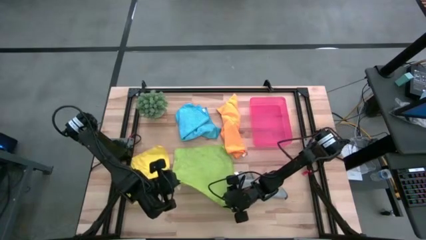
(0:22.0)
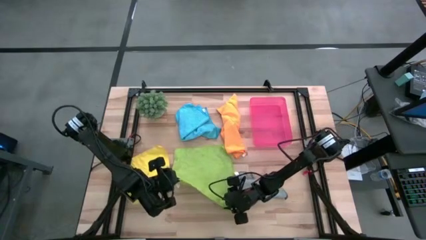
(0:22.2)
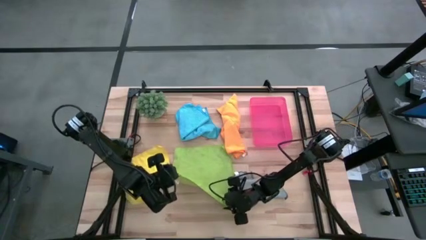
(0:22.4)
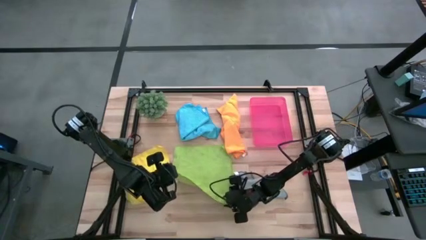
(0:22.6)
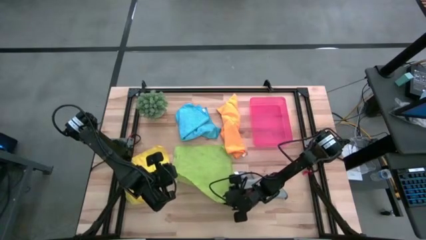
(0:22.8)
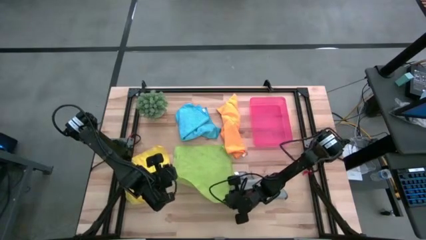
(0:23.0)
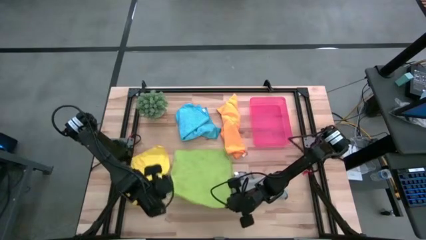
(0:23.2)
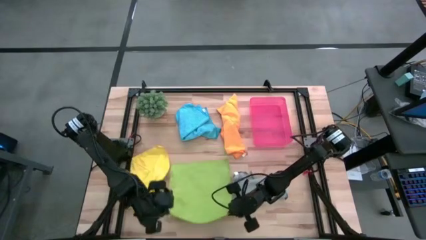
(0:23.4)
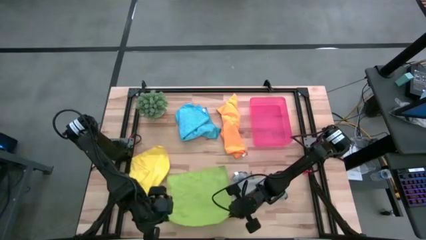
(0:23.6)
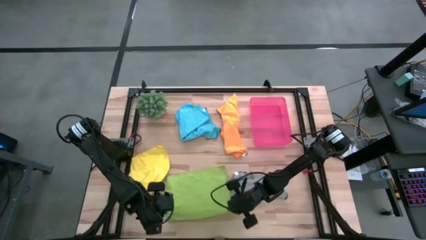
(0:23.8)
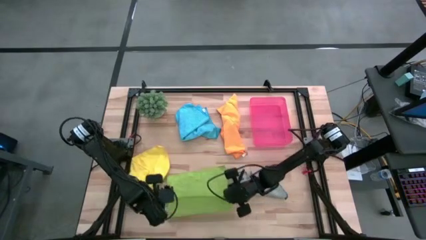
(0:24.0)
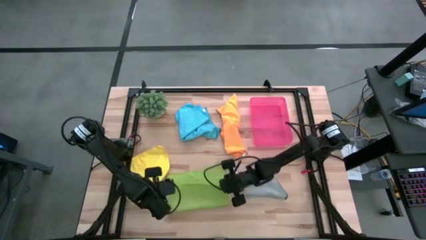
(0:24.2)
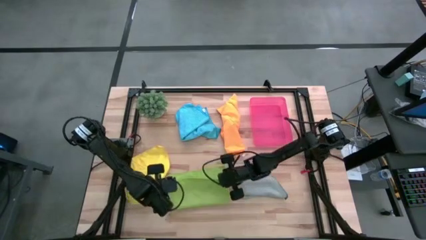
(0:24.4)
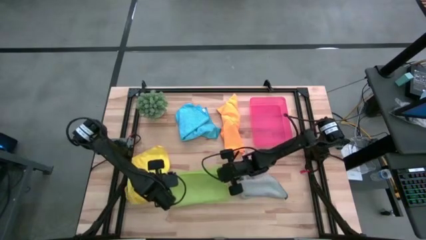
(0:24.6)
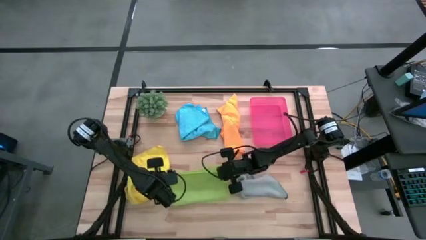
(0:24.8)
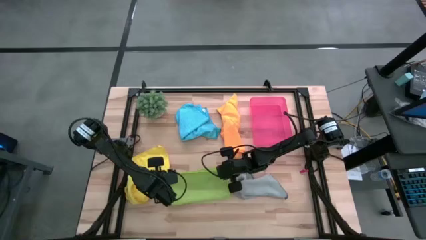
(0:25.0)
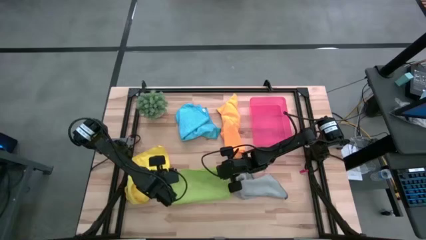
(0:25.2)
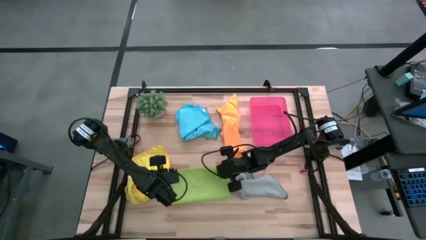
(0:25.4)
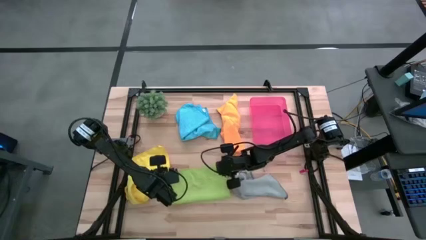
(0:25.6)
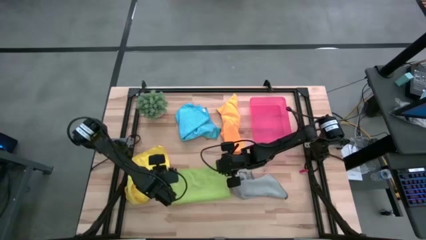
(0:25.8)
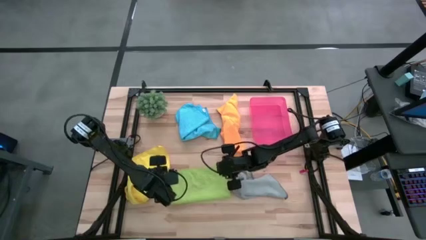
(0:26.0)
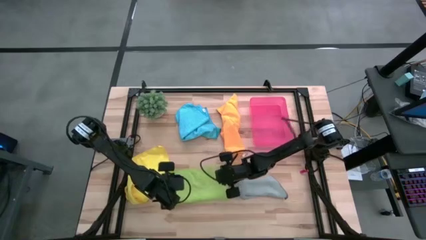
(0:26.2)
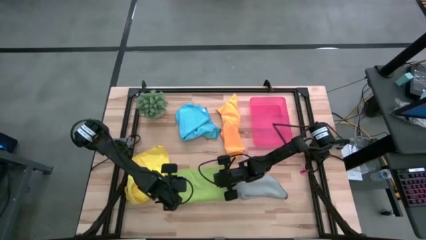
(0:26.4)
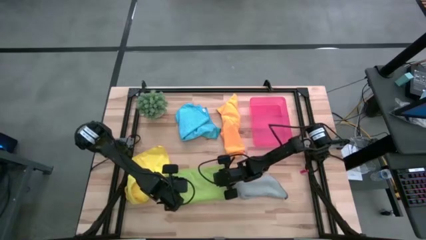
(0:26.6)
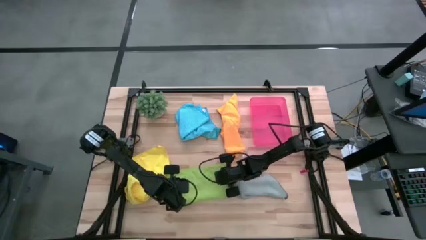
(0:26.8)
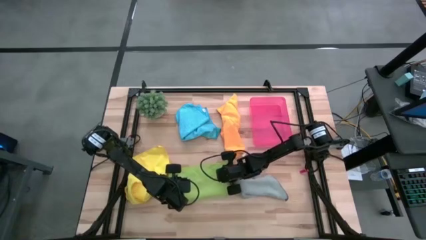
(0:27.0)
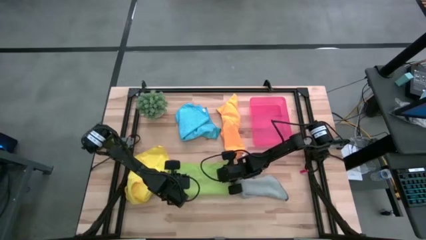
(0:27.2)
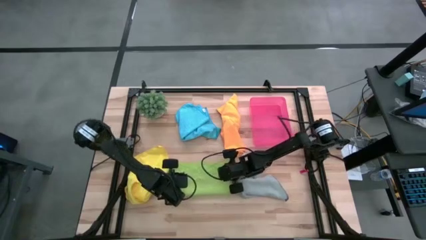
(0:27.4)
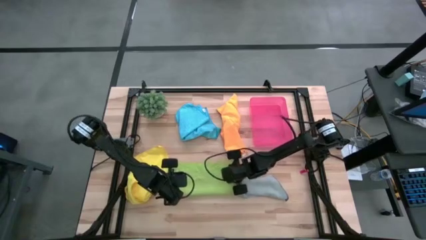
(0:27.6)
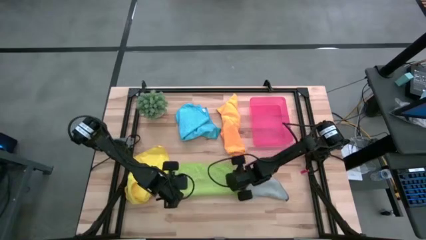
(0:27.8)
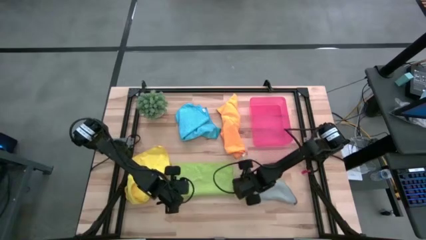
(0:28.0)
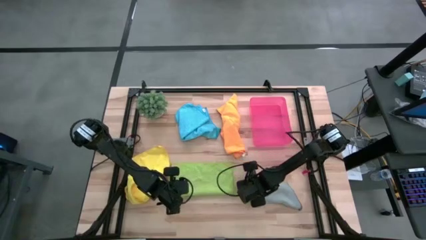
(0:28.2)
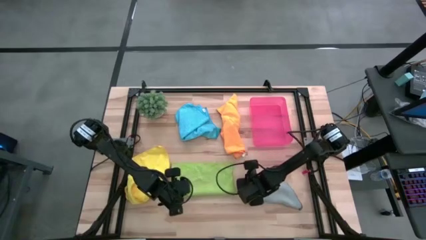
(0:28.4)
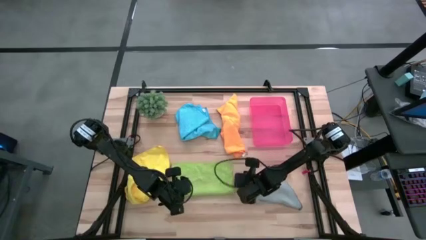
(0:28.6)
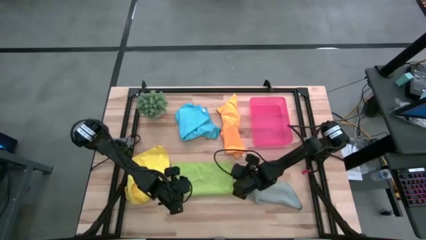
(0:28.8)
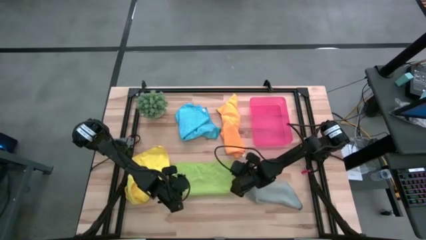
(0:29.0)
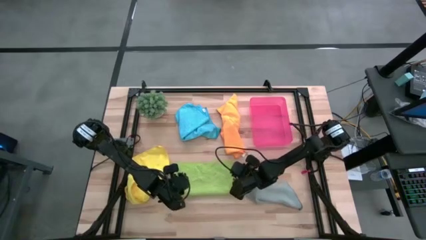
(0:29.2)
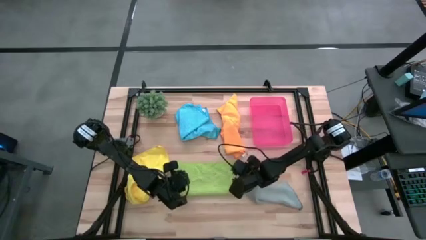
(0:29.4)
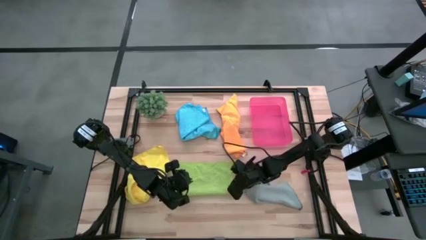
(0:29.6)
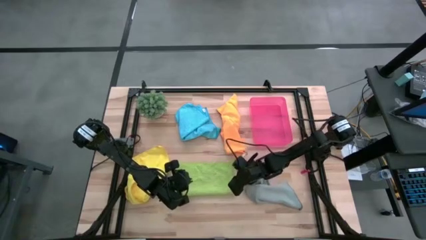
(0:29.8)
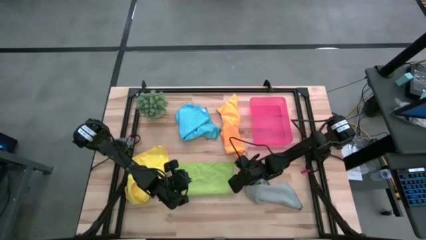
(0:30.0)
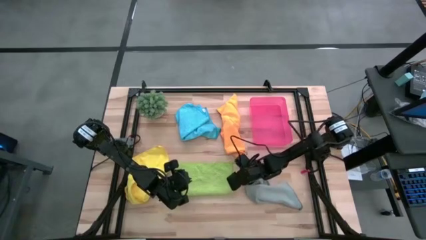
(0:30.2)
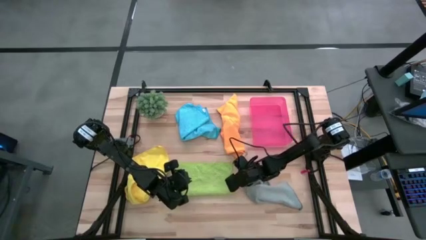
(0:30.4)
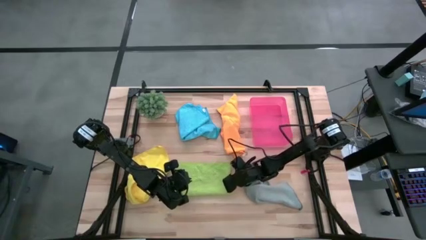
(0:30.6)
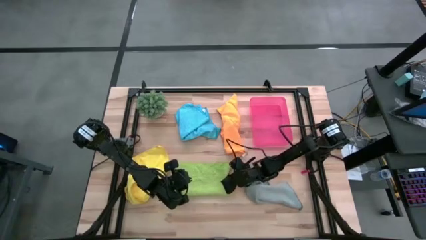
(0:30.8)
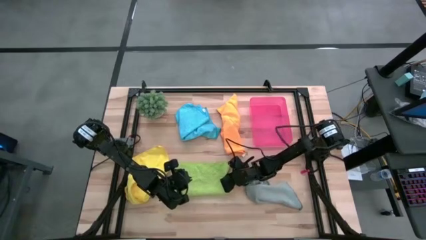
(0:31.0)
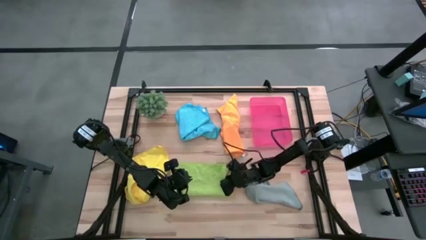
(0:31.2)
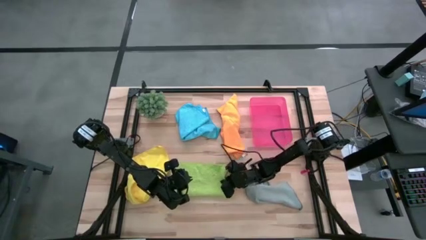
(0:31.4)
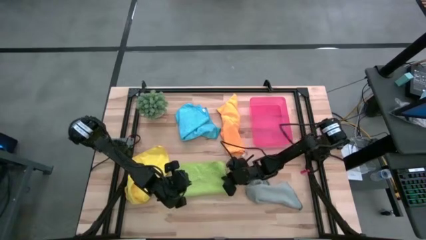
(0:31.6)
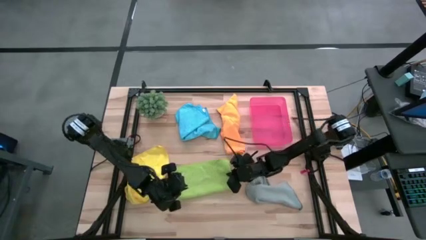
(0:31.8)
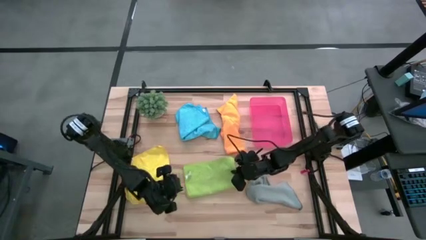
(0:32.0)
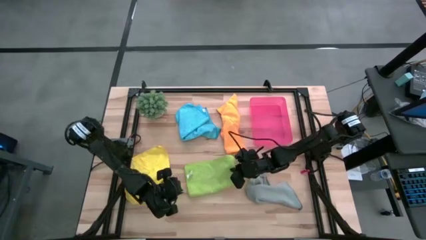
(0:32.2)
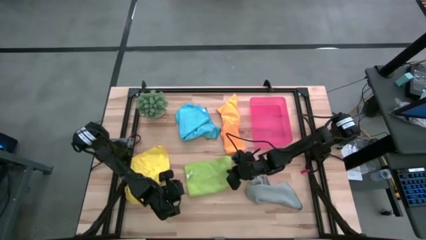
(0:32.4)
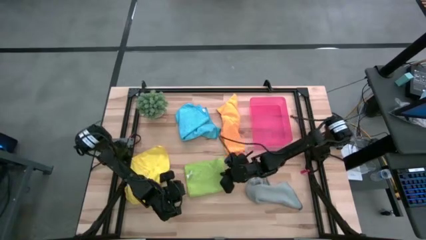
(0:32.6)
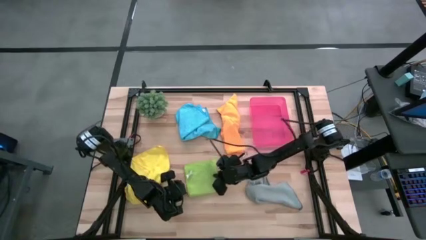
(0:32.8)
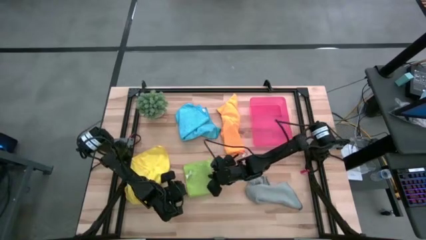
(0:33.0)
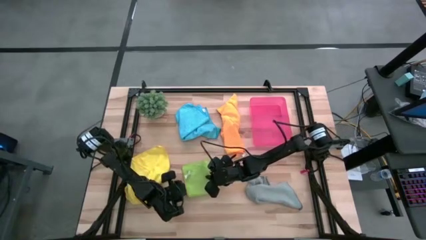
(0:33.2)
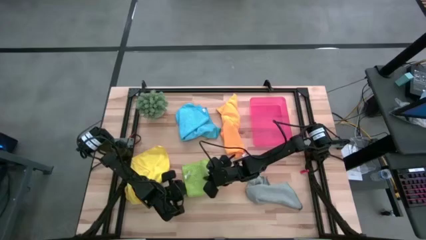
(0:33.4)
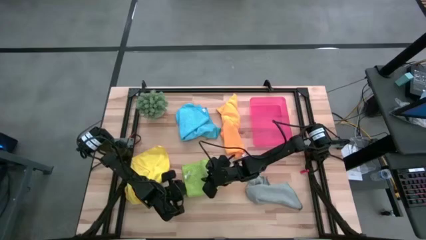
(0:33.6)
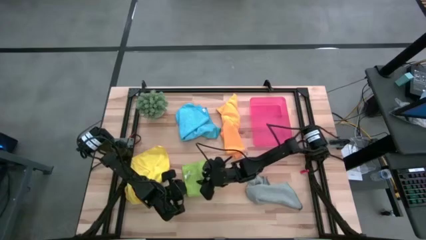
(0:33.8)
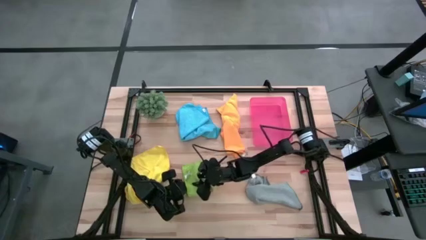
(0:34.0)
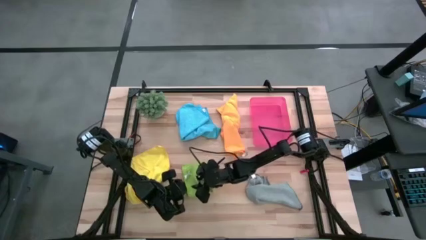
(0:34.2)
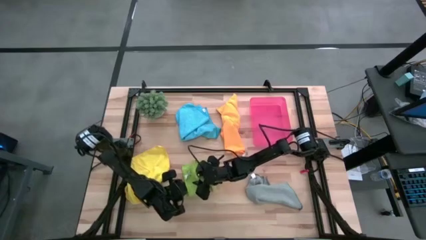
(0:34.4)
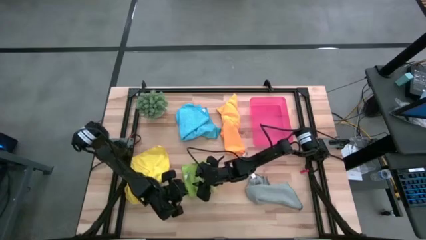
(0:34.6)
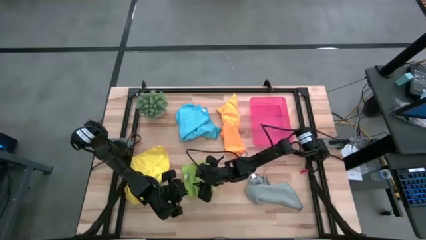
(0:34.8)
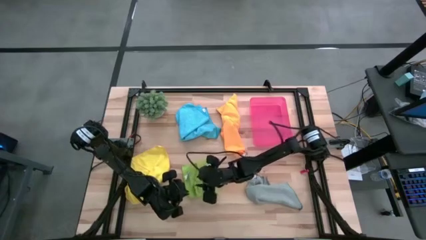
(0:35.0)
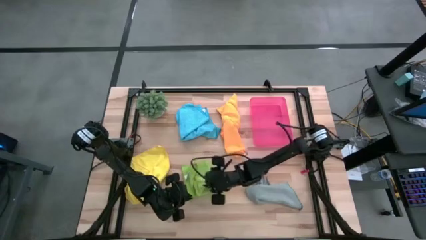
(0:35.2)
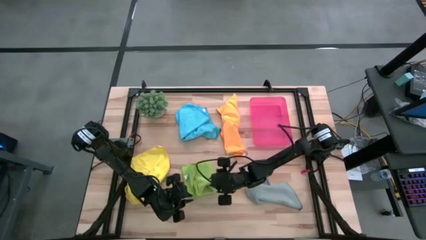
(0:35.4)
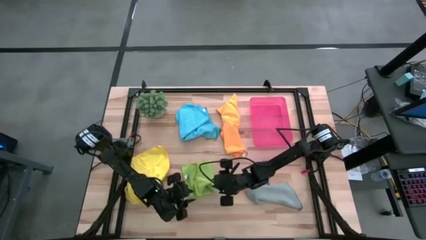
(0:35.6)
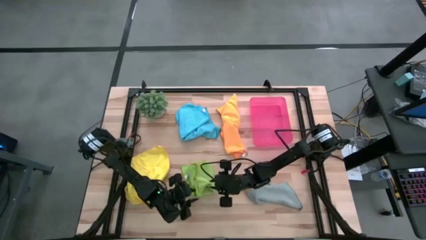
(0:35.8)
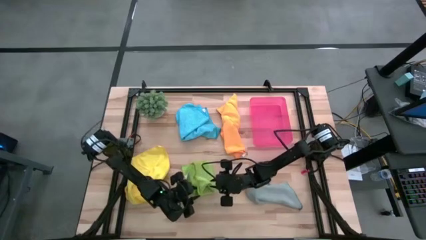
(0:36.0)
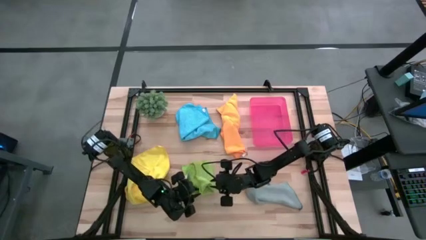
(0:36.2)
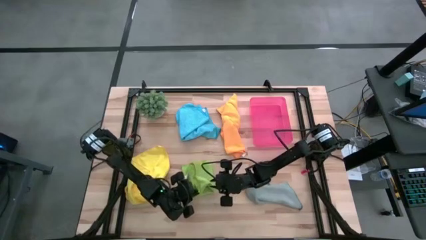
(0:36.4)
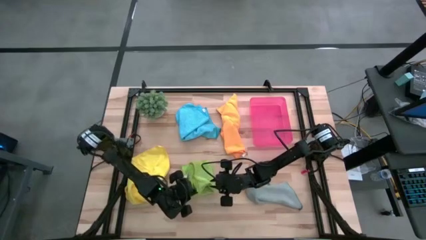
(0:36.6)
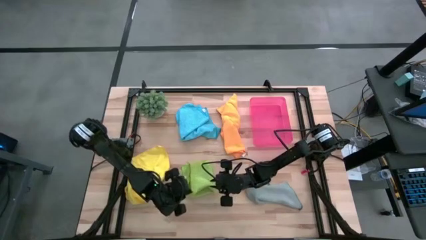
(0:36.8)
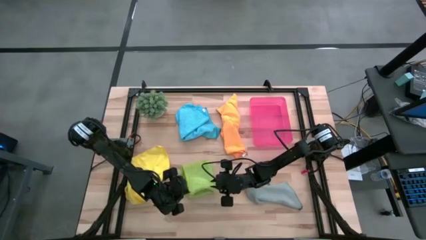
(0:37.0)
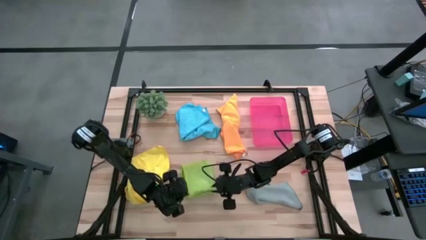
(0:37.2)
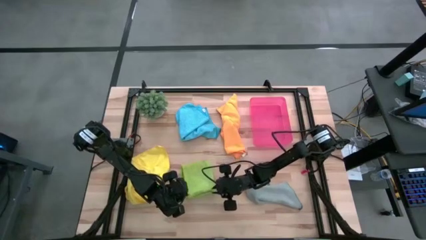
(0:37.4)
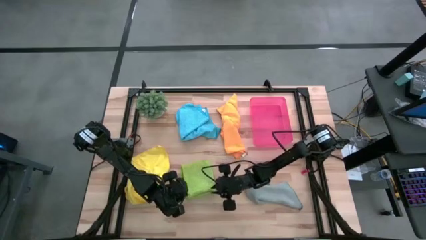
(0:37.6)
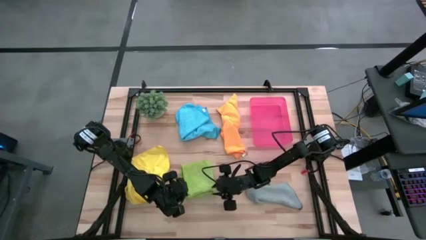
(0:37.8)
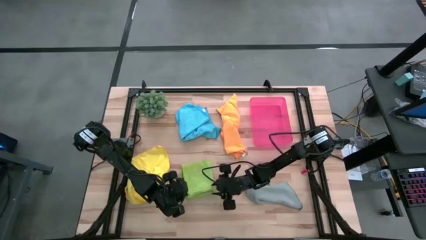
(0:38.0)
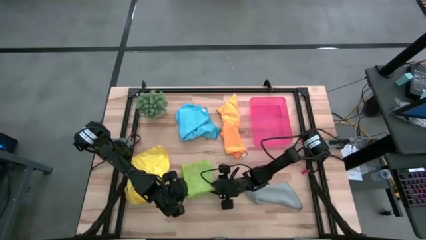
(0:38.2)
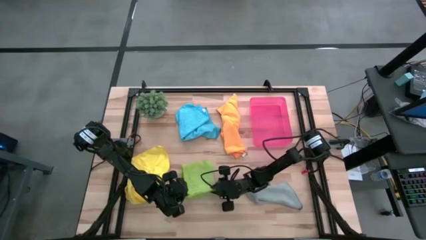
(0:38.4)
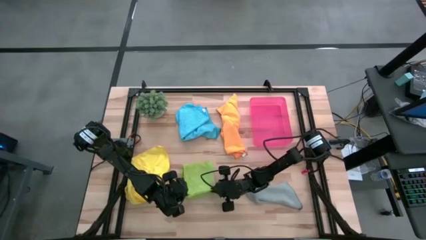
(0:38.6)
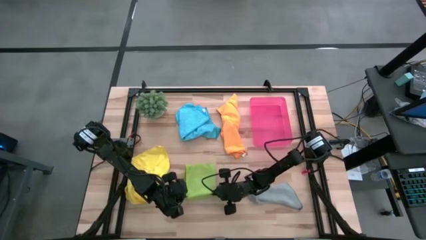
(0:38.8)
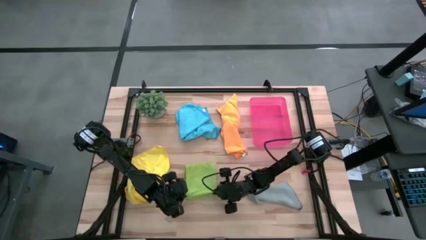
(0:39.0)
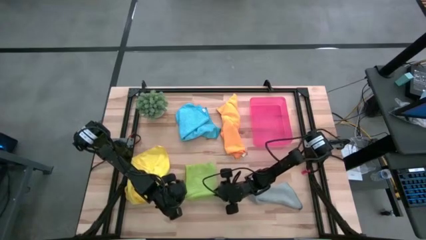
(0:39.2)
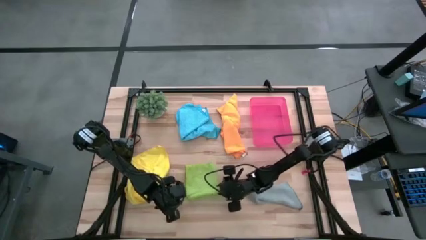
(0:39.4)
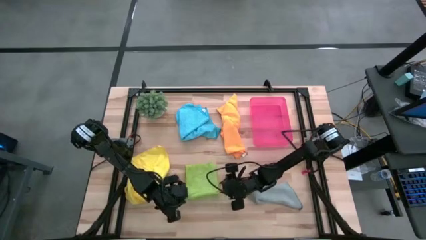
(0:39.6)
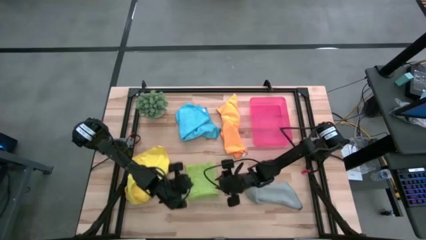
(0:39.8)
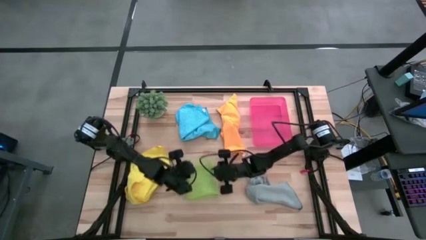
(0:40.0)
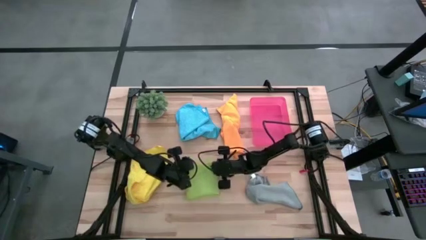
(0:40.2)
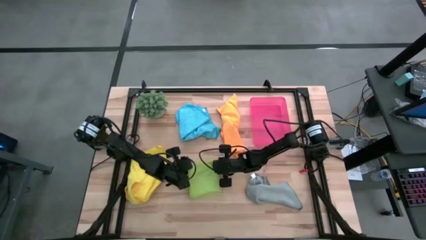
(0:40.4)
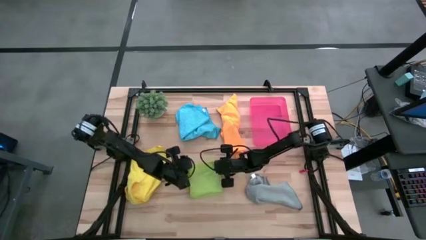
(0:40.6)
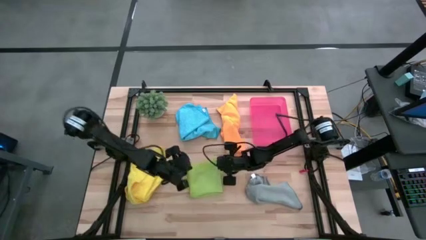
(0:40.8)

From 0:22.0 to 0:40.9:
Task: Fold microfiber towels
Fold the green microfiber cloth
